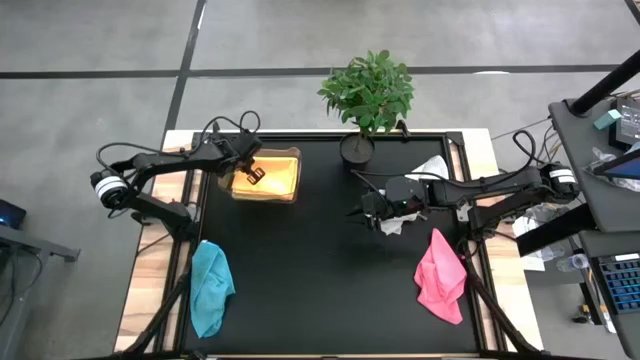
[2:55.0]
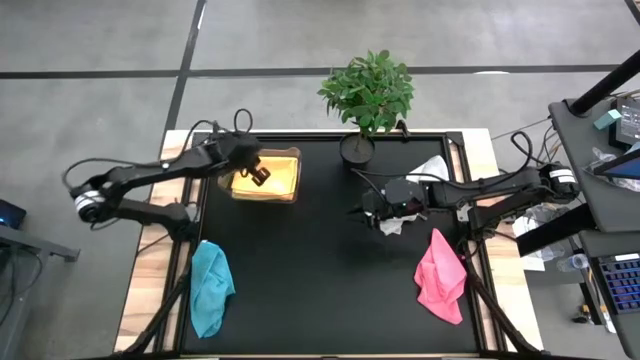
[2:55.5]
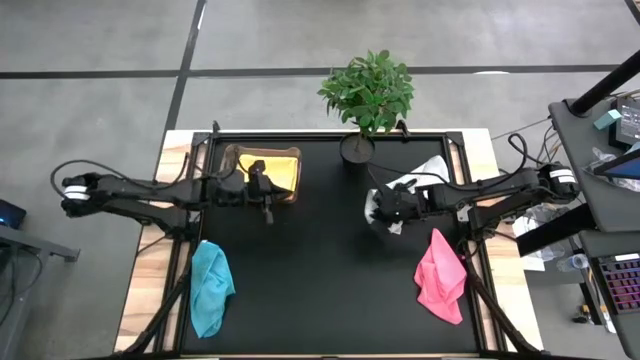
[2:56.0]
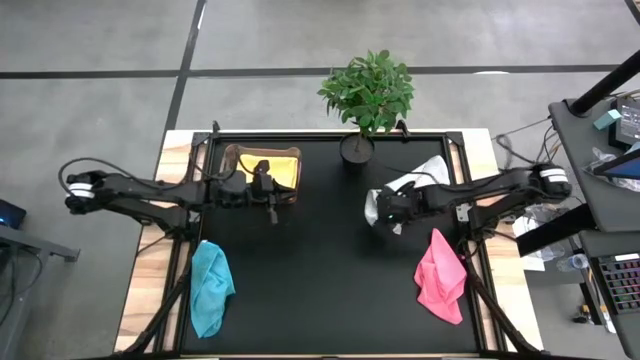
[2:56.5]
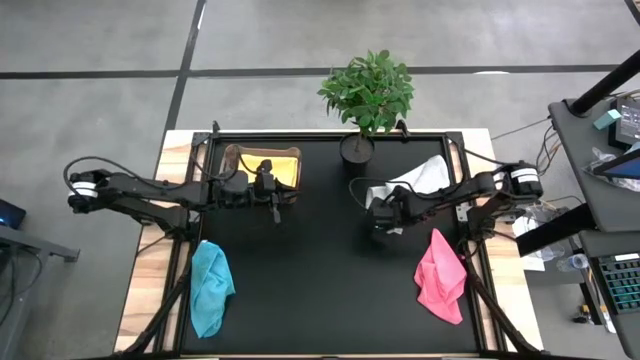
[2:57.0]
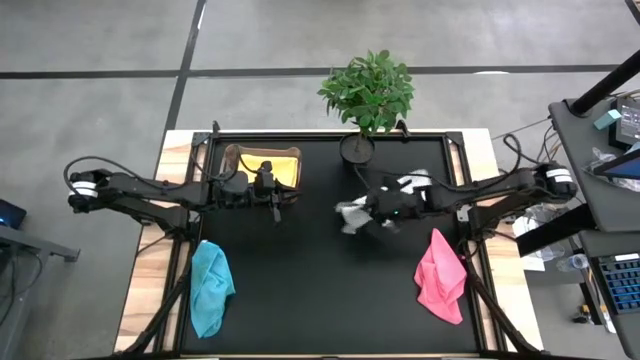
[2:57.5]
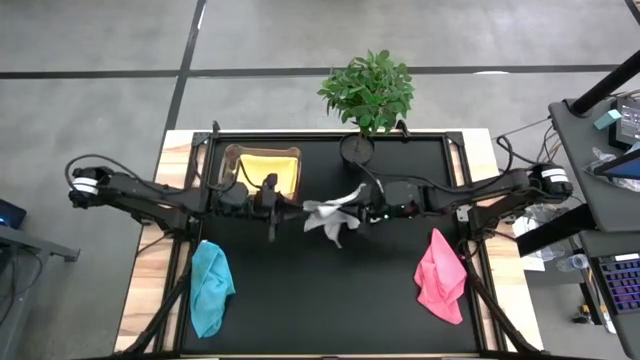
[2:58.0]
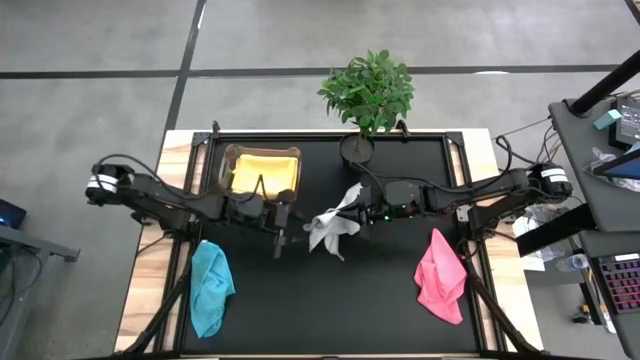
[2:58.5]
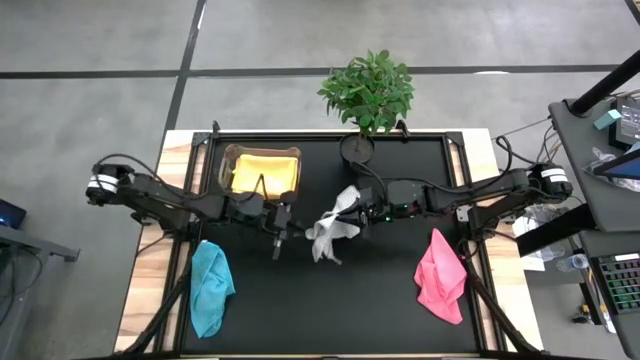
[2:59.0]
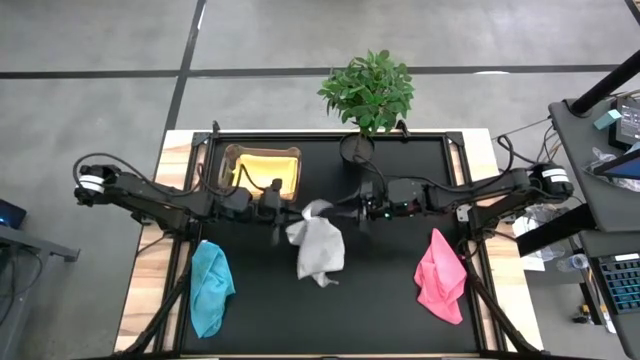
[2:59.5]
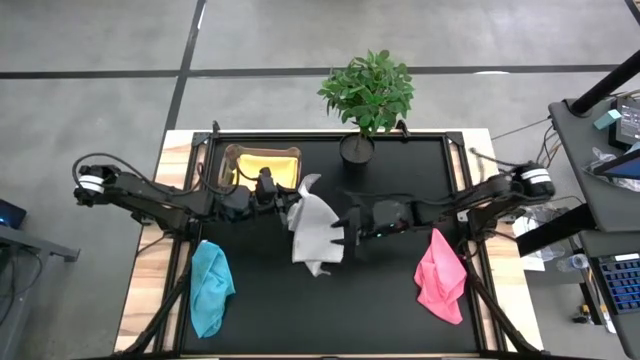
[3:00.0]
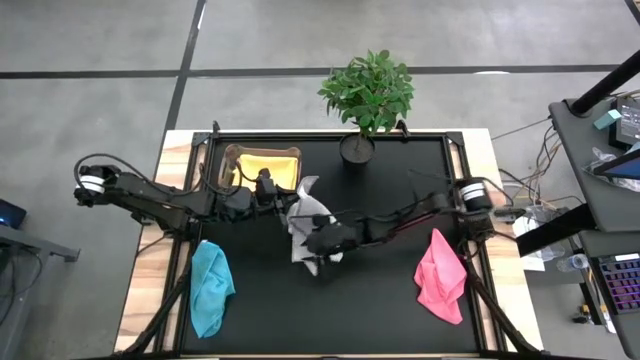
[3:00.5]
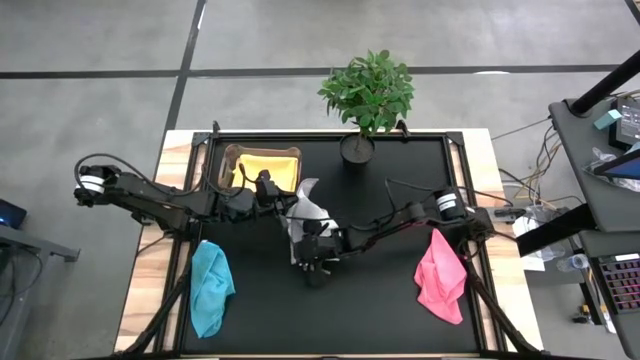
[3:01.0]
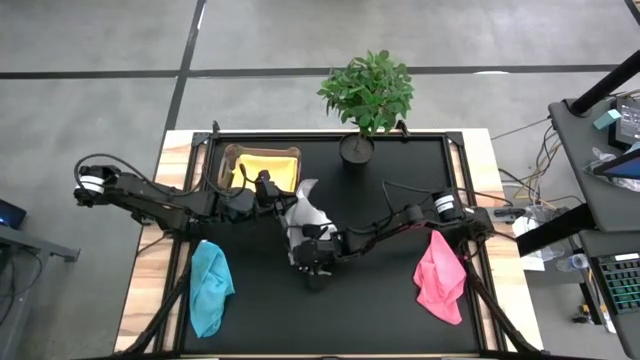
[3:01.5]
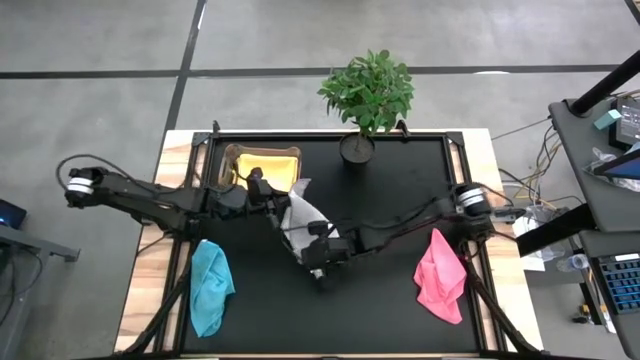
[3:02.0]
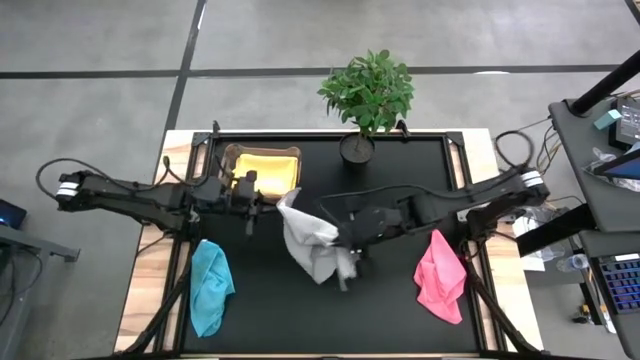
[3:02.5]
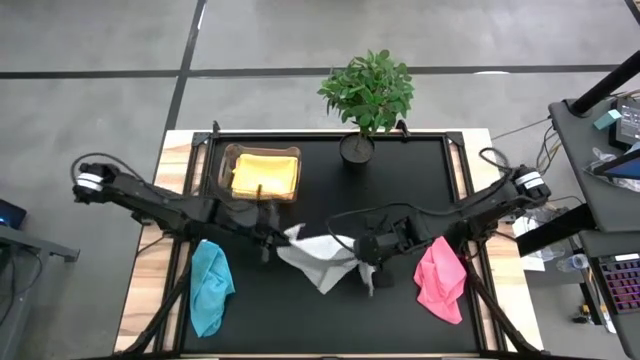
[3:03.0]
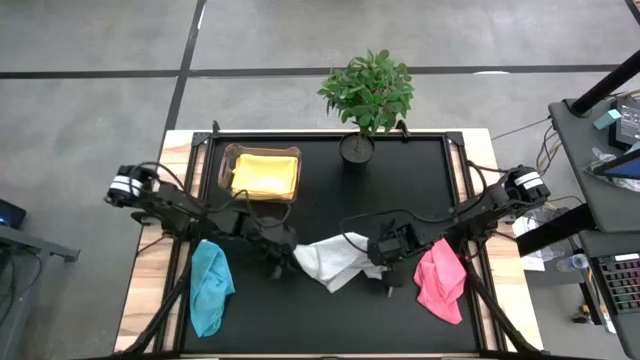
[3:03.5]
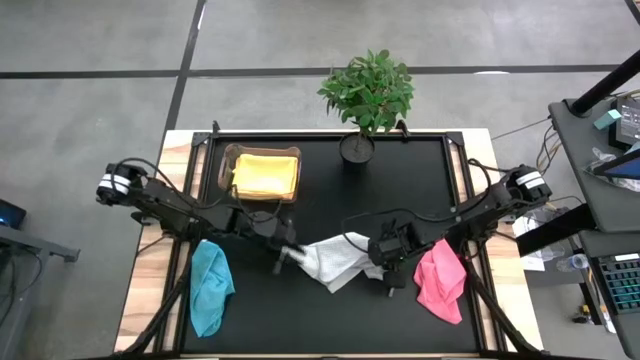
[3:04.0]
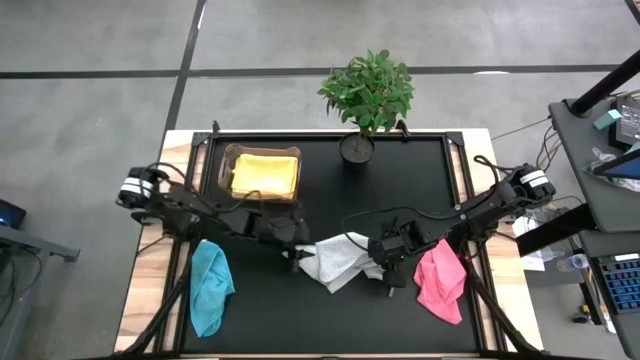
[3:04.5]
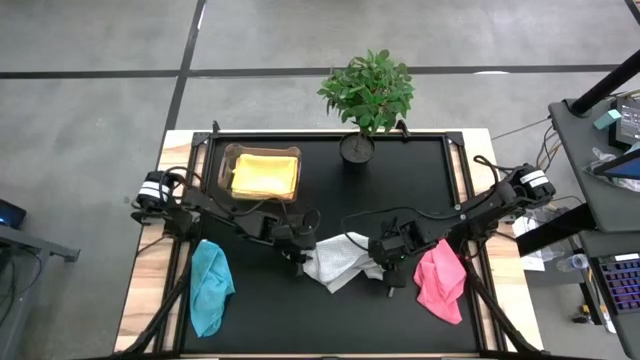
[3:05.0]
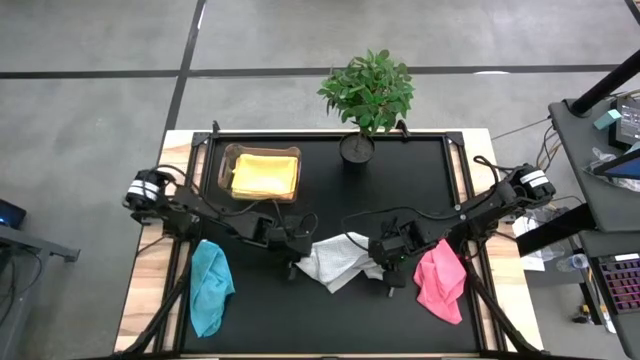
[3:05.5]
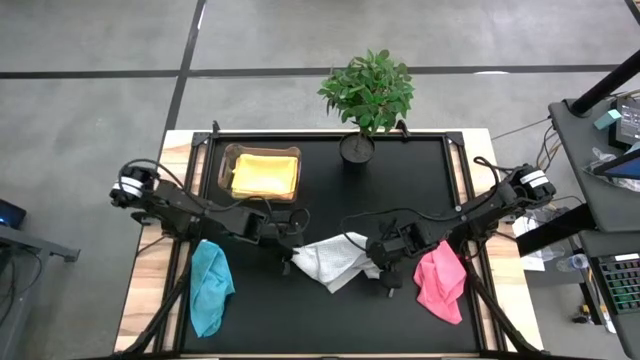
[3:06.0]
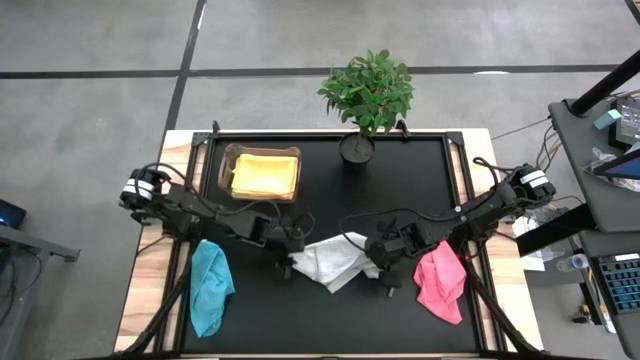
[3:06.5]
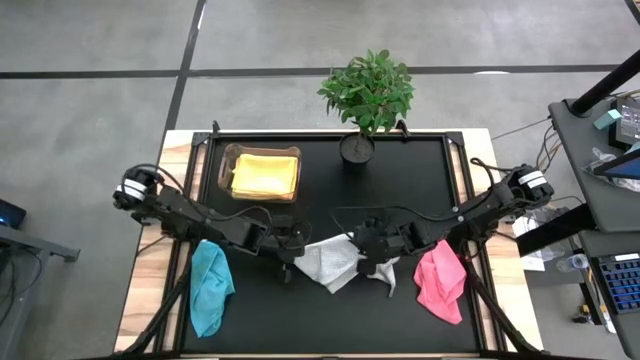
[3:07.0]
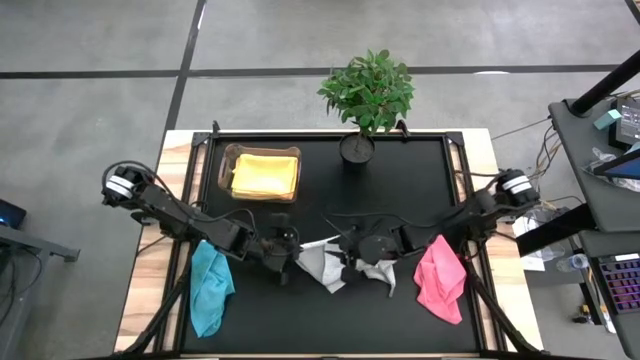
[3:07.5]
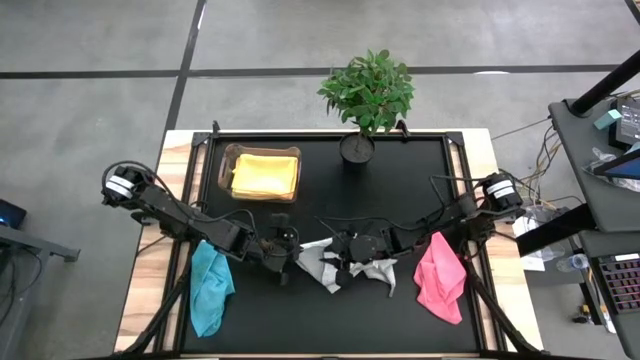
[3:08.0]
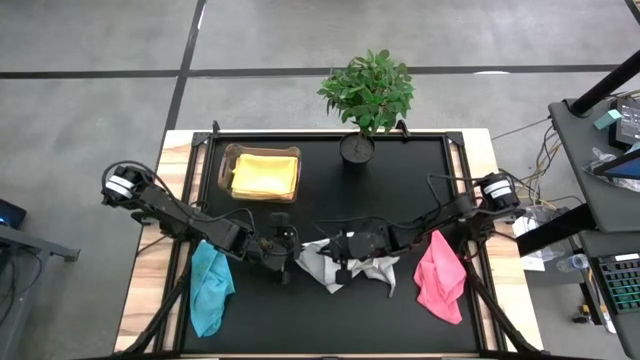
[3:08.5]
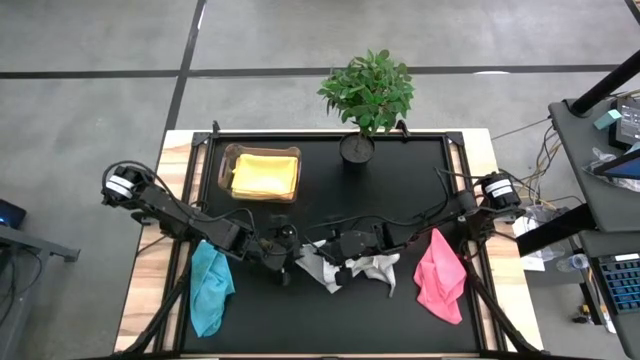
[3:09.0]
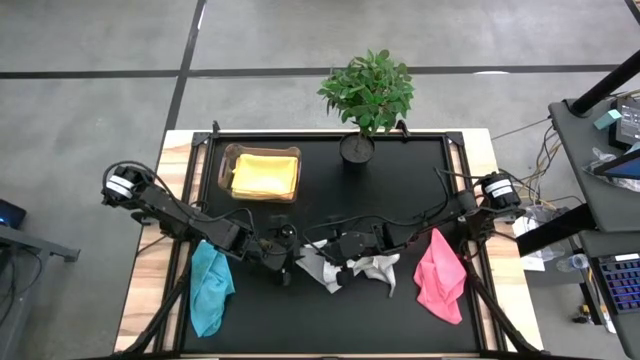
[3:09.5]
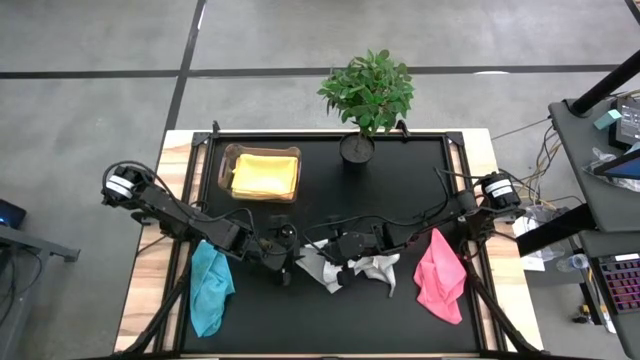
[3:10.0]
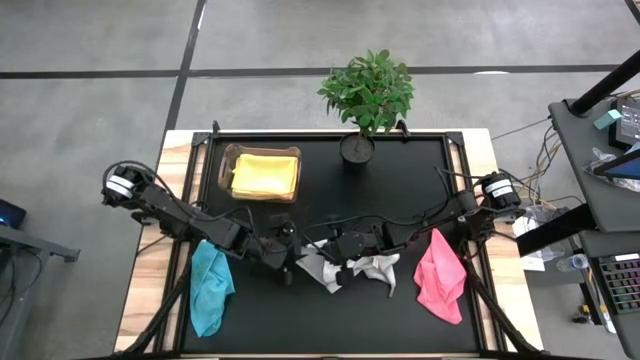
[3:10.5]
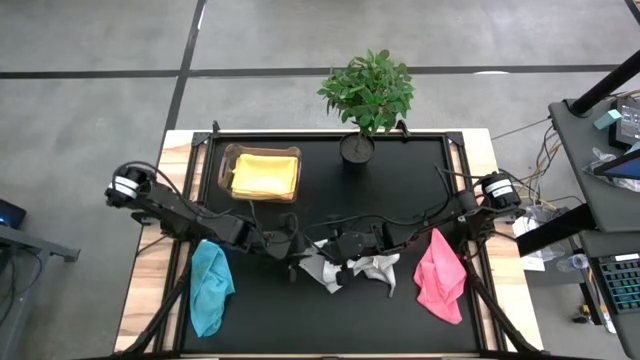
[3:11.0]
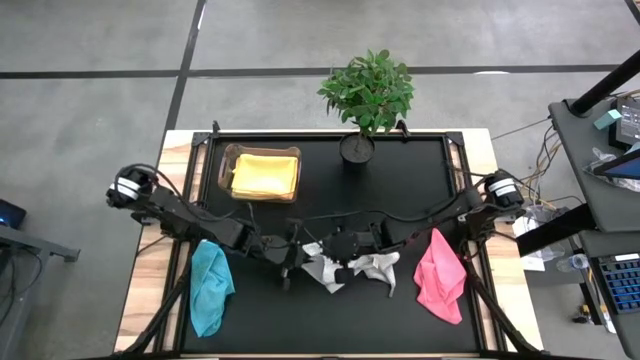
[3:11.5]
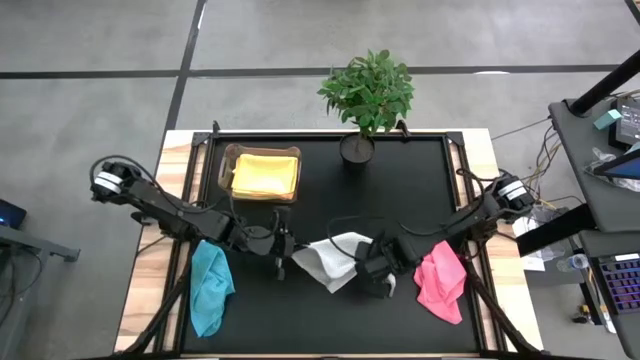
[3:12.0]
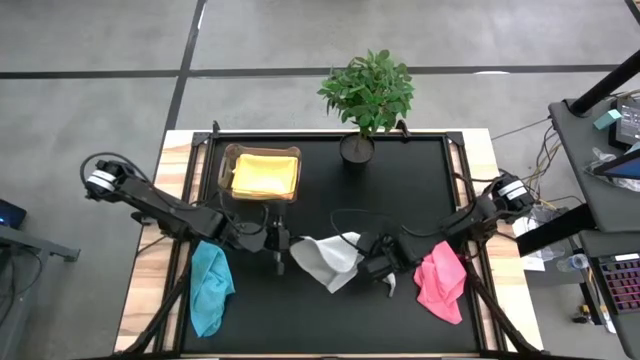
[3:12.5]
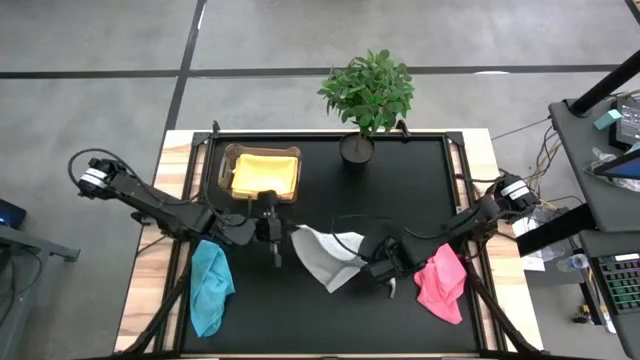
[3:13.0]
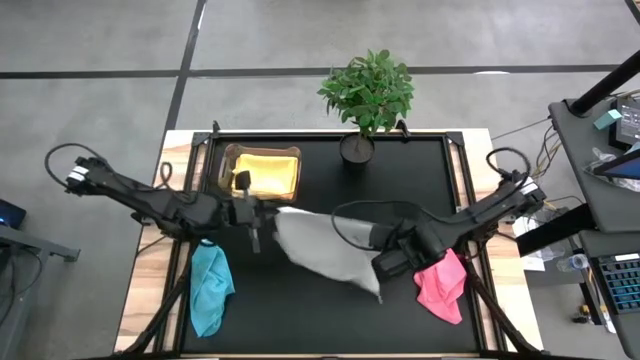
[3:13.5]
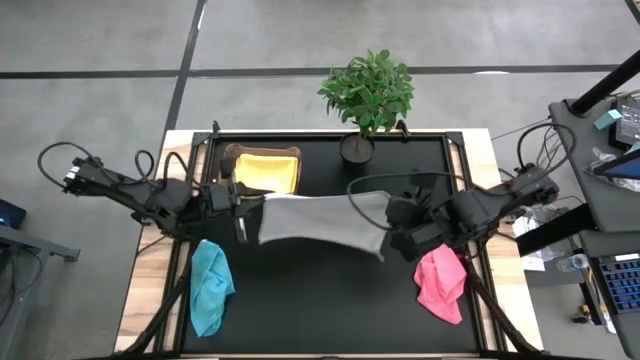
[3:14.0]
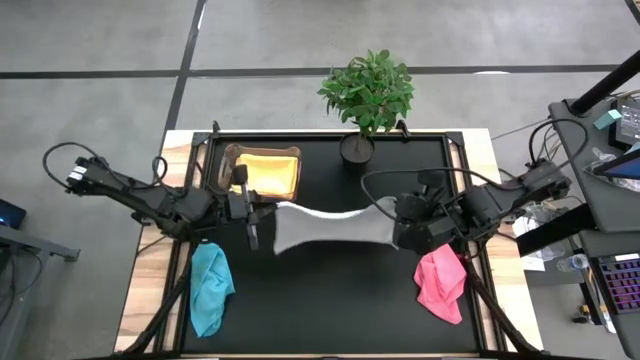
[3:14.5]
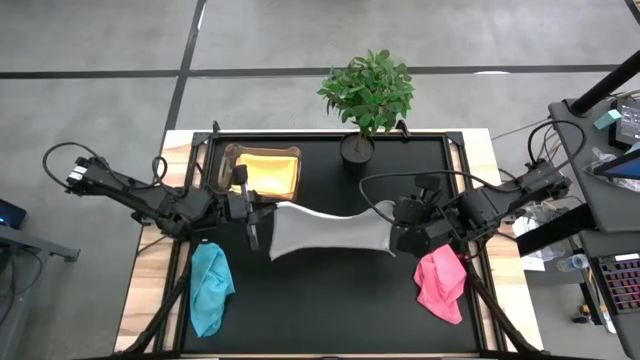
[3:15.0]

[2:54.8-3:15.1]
Task: Fold microfiber towels
Fold the gray towel
